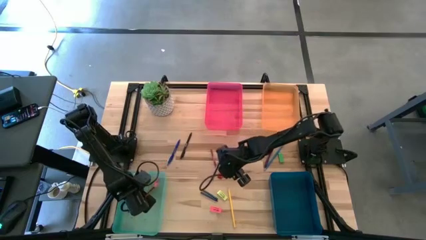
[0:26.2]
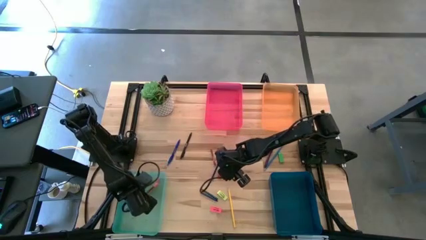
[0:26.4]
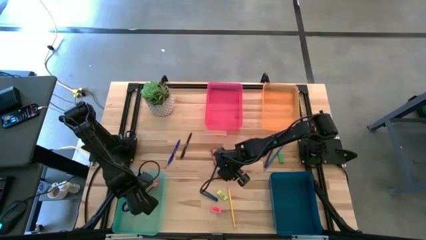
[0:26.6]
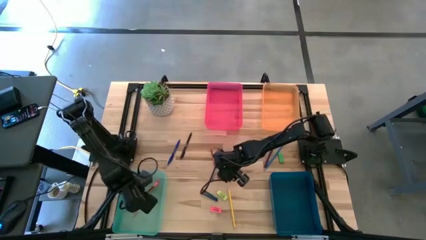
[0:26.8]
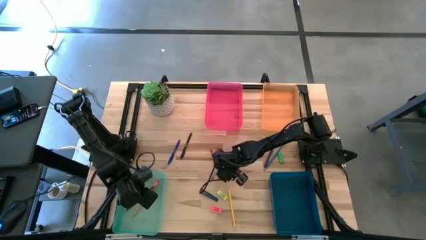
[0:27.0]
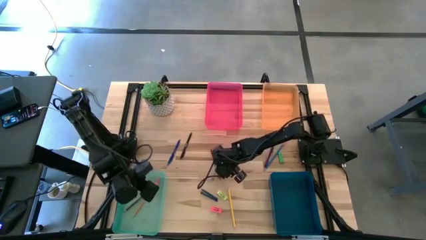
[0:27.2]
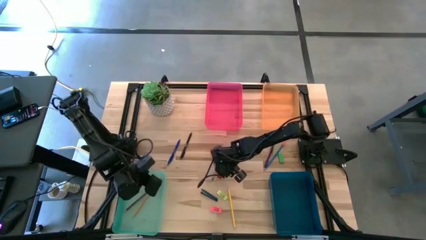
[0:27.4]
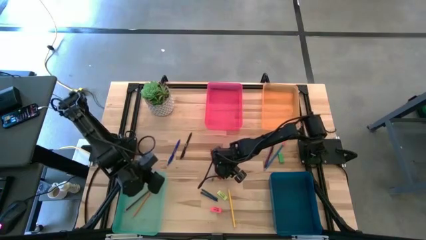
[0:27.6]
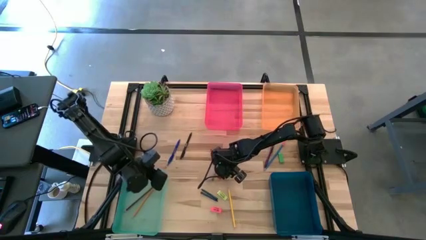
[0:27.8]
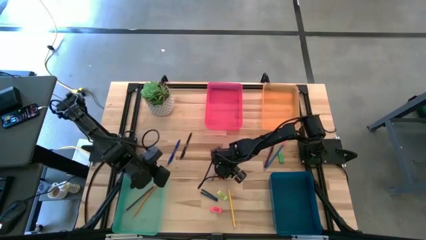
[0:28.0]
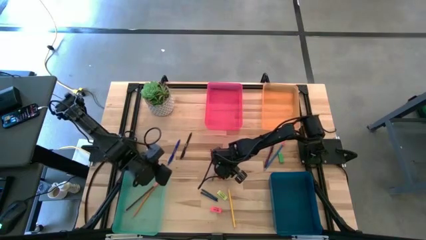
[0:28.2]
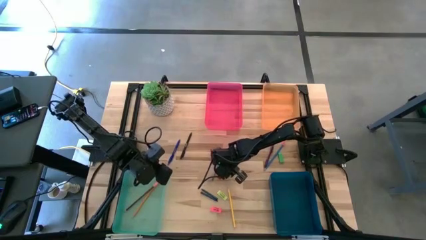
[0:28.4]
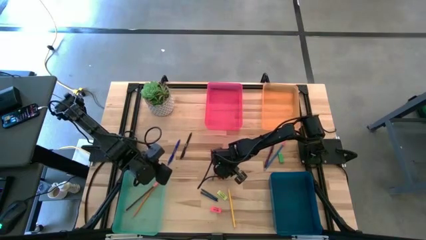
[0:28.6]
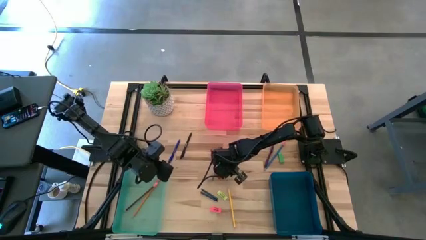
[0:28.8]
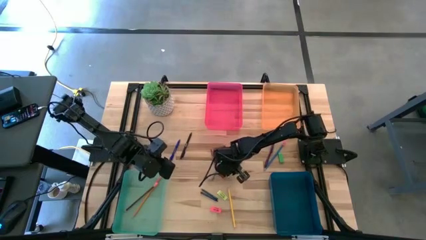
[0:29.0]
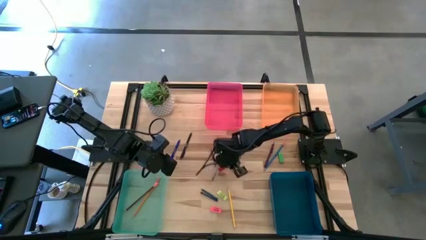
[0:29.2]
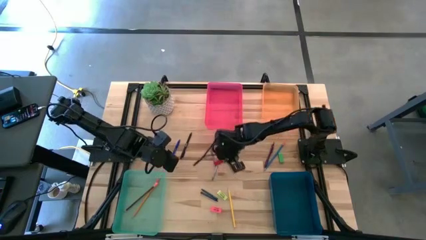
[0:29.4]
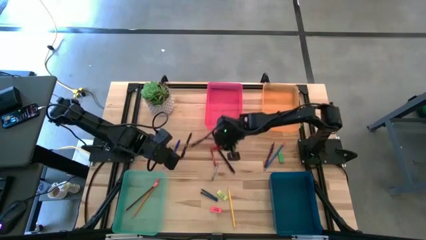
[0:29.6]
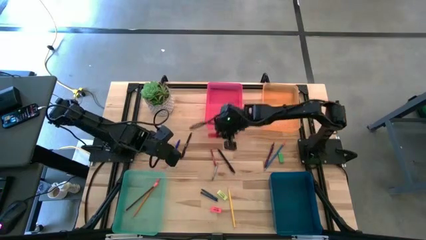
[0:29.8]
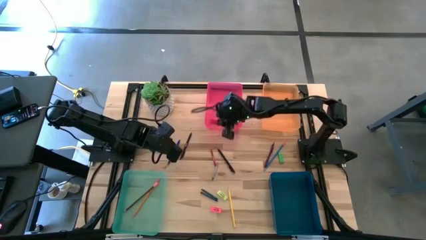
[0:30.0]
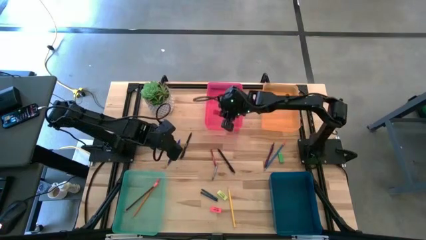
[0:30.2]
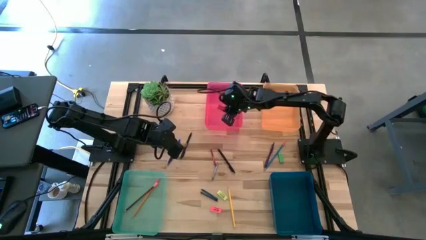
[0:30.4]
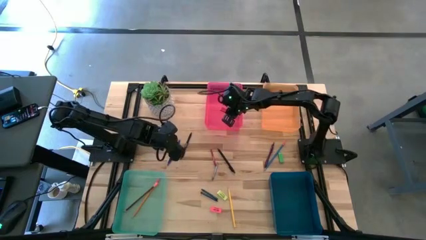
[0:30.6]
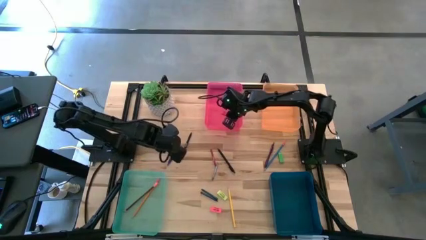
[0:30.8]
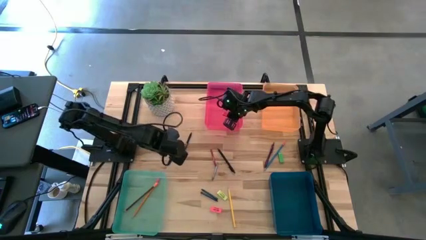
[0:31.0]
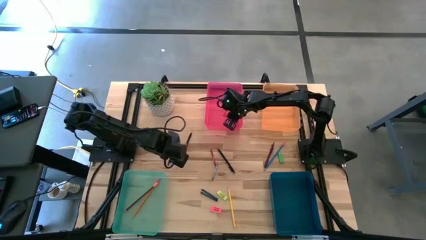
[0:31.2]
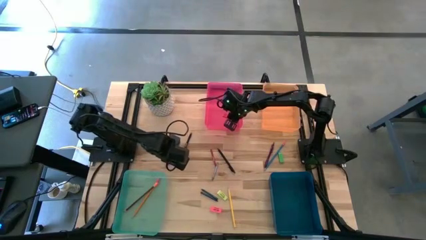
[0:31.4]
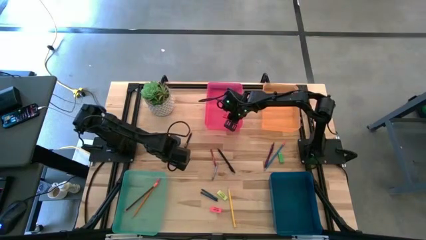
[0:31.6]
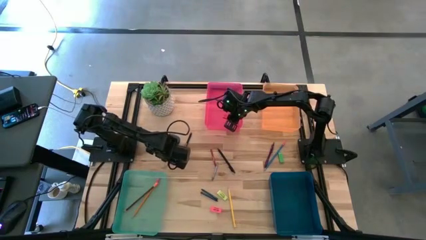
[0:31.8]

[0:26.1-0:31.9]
Task: Sort crayons/erasers/pens/pencils in bins
Put the red eraser into the pink bin

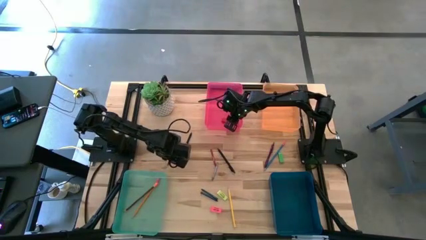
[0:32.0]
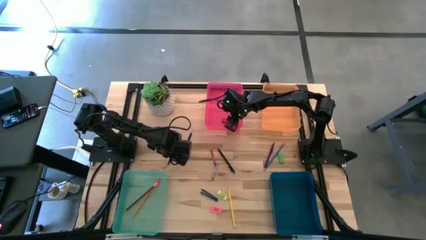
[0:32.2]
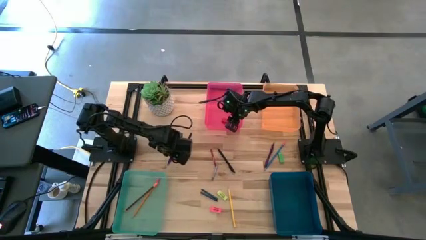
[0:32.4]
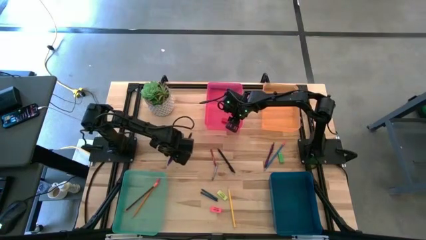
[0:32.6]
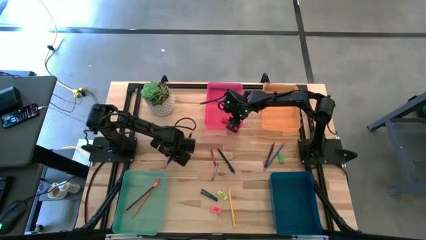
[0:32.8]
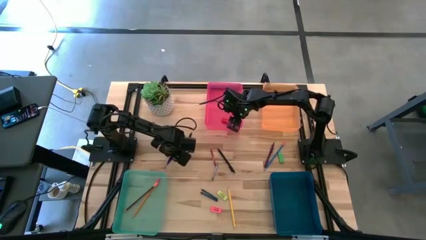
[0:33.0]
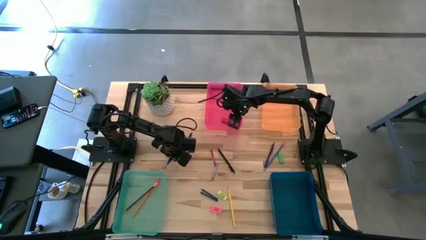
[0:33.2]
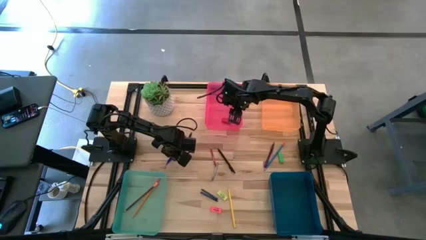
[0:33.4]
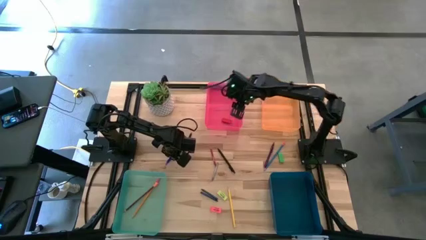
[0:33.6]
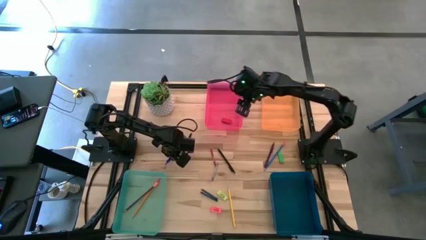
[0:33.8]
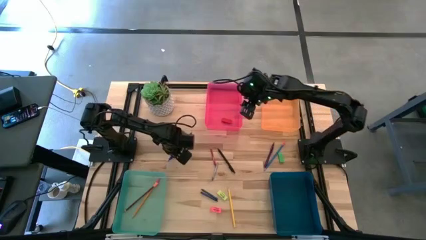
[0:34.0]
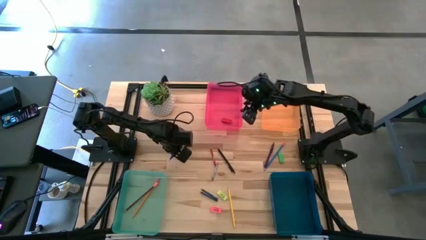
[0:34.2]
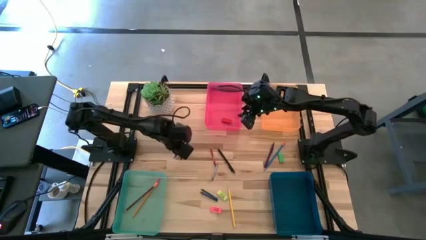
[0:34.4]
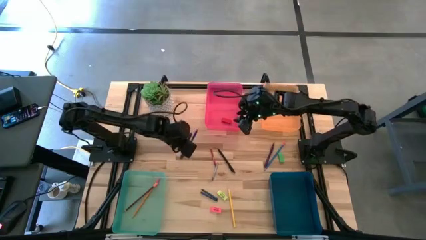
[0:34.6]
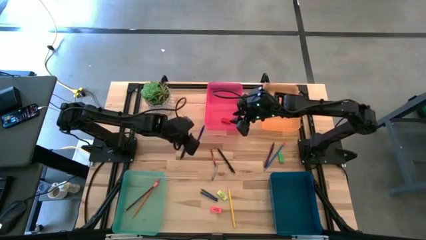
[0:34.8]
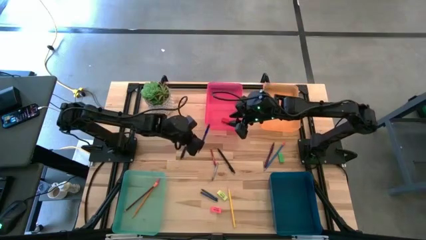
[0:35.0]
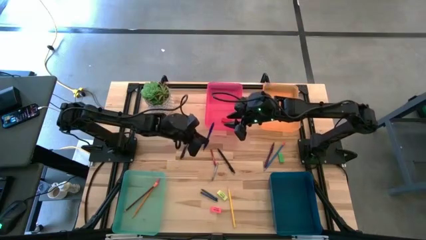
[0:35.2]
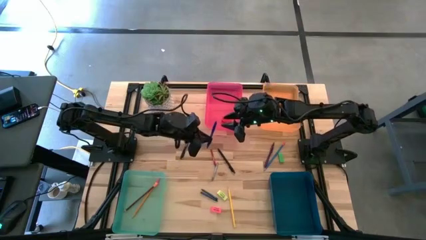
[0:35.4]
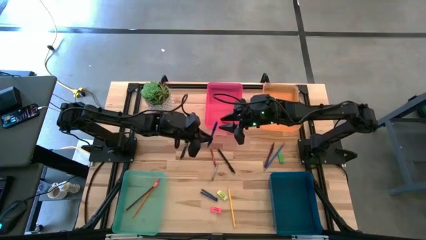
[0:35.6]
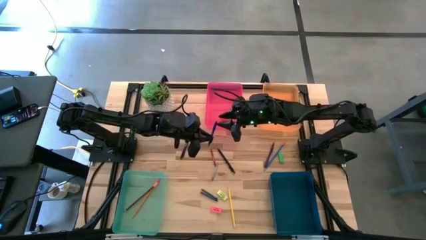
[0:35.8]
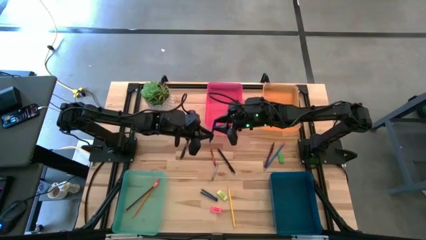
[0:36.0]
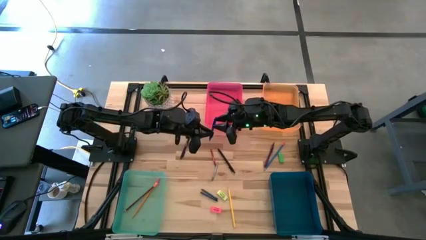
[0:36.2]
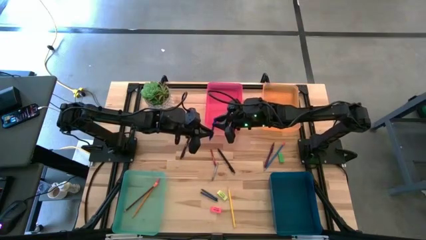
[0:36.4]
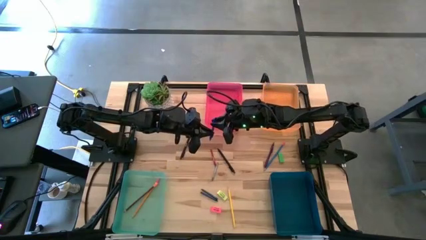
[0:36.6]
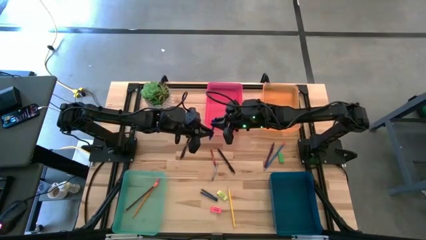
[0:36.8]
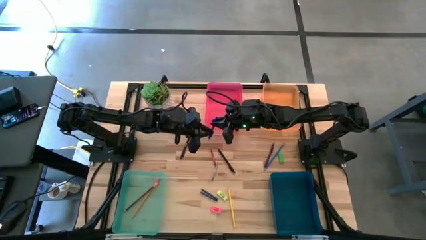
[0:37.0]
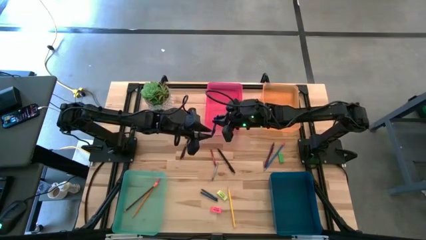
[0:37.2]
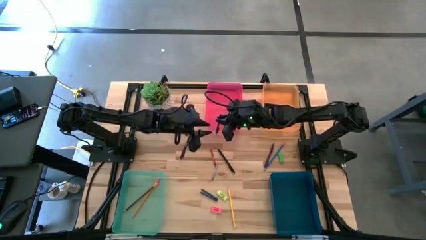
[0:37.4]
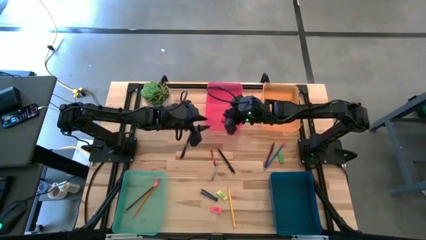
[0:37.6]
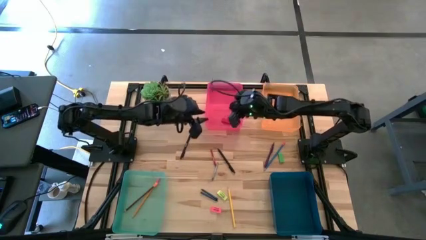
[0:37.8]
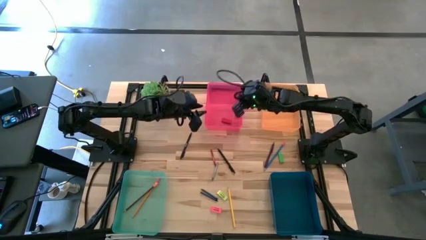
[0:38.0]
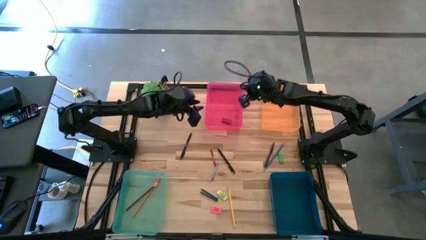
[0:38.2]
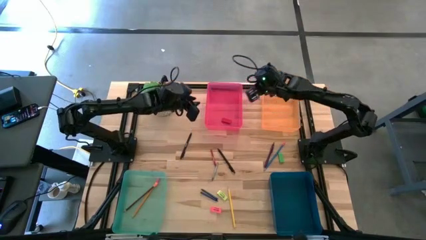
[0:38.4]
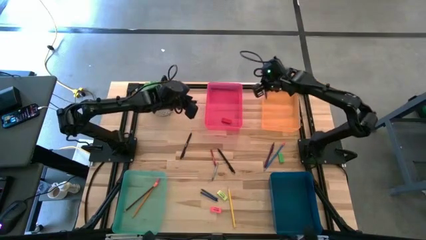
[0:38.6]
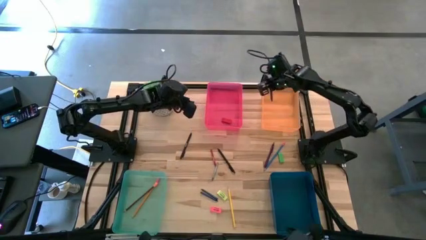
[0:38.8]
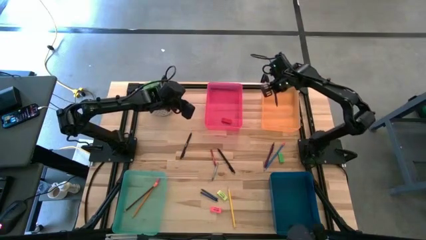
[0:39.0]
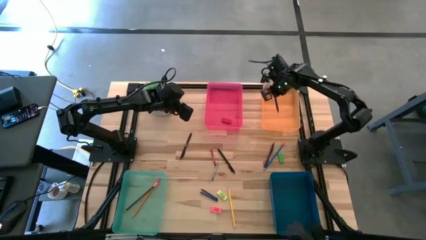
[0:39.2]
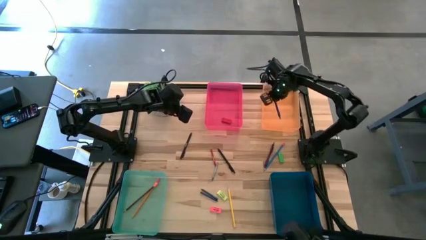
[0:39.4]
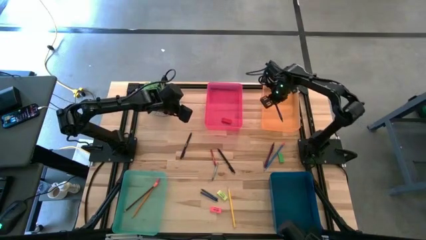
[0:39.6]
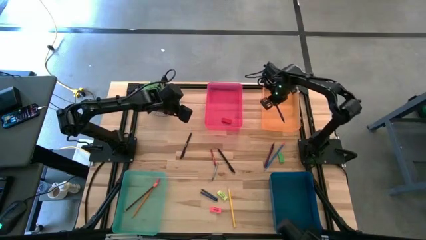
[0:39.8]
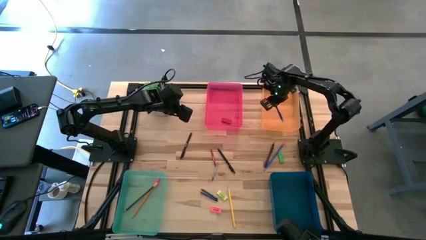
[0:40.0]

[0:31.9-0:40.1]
Put the blue pen into the orange bin

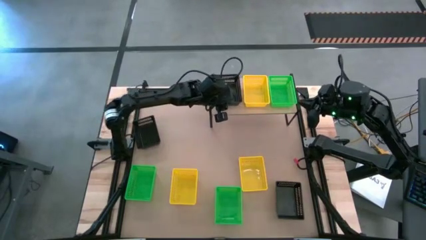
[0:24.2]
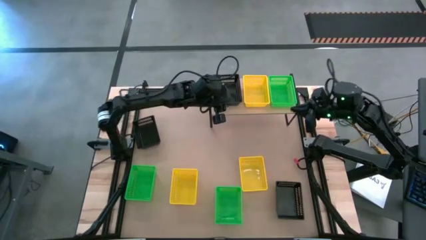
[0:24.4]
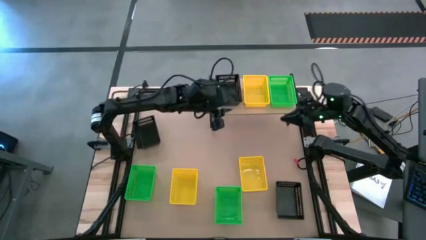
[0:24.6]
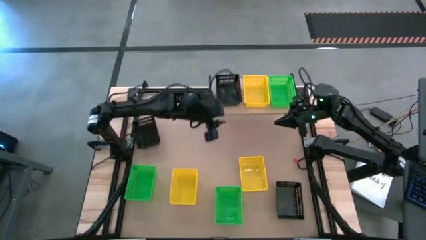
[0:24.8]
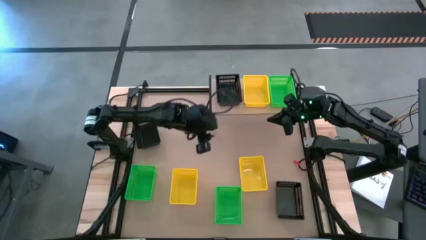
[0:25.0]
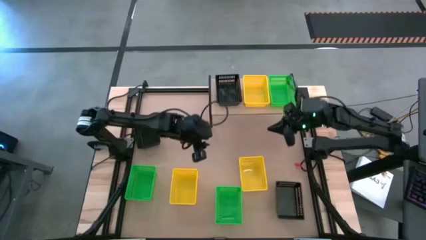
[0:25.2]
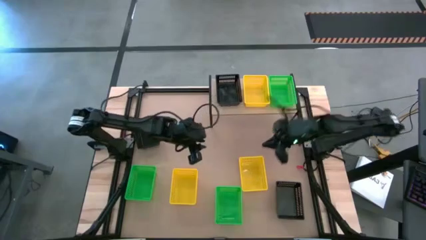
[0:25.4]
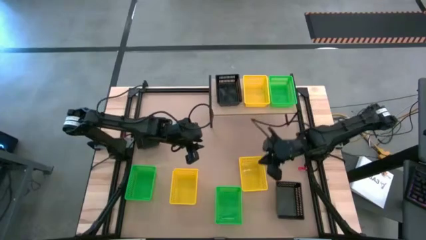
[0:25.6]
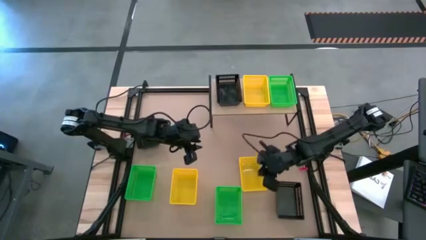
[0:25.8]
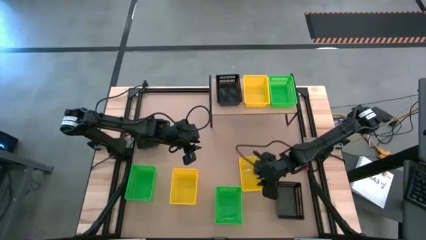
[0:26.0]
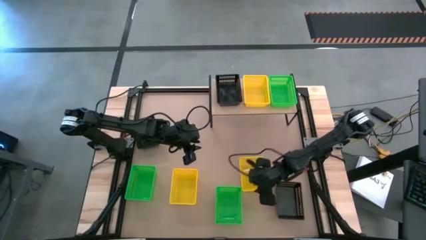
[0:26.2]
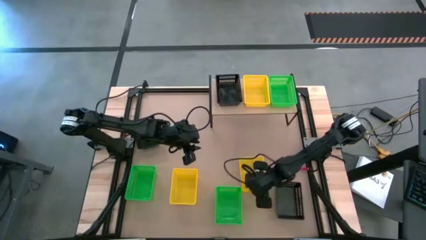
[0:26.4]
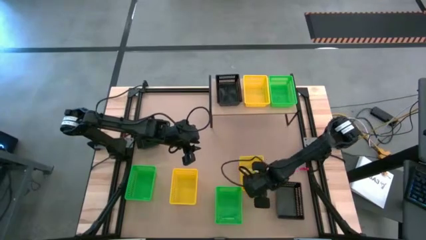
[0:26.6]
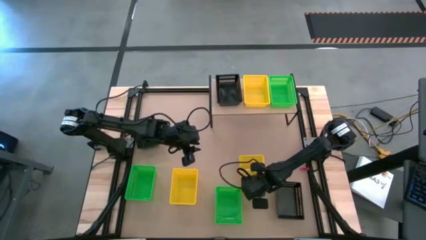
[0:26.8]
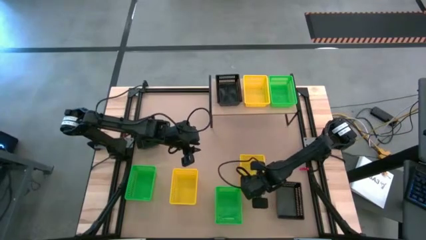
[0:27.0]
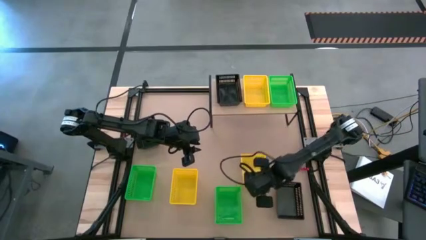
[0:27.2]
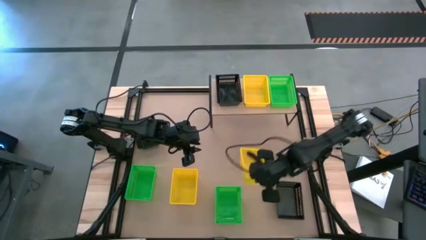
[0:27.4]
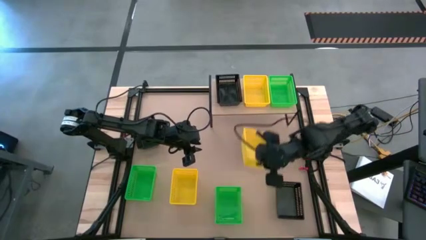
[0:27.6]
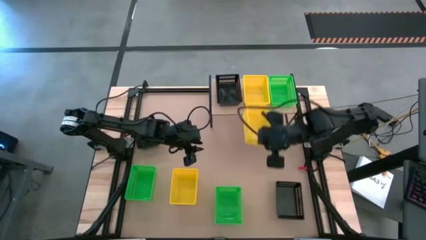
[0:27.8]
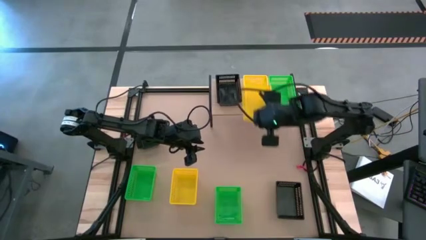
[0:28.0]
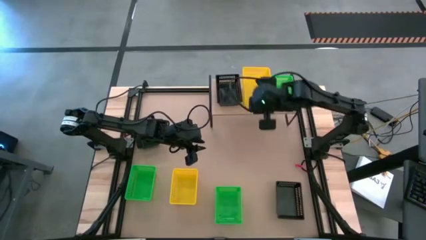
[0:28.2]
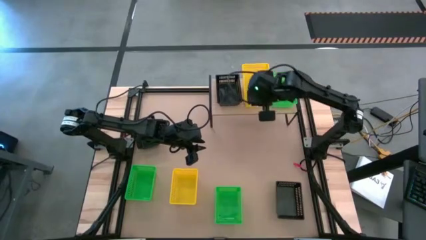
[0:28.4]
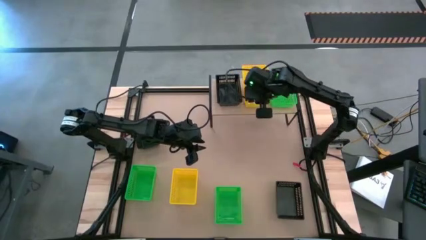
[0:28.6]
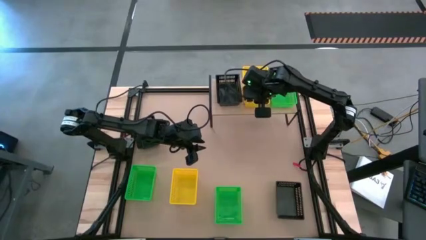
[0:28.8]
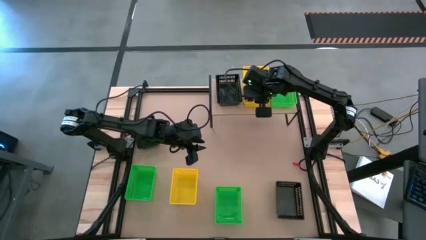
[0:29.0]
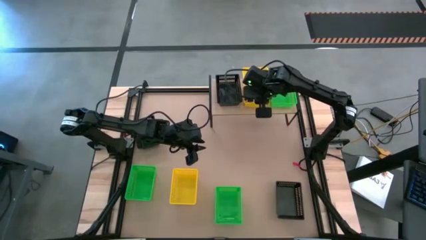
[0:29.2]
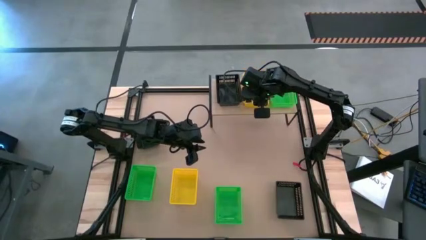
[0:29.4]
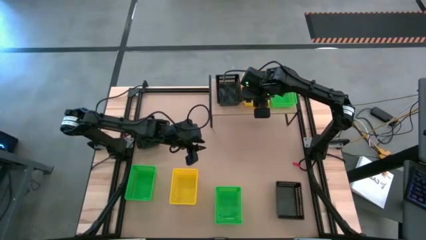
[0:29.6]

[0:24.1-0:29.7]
Task: Stack baskets on shelf by color
Stack the right yellow bin on top of the yellow bin on the shelf
